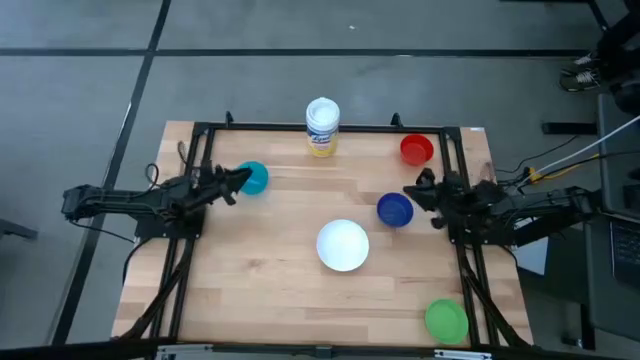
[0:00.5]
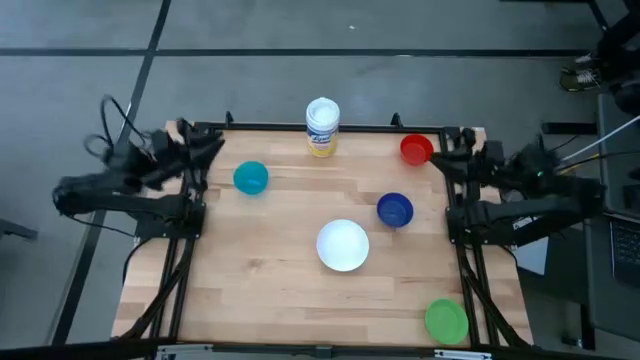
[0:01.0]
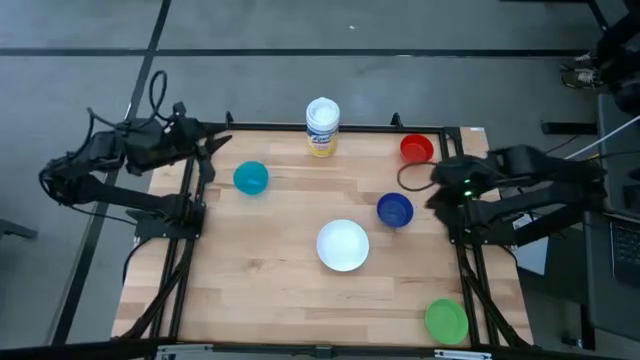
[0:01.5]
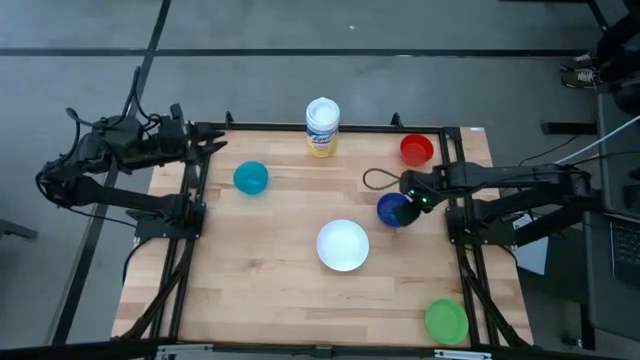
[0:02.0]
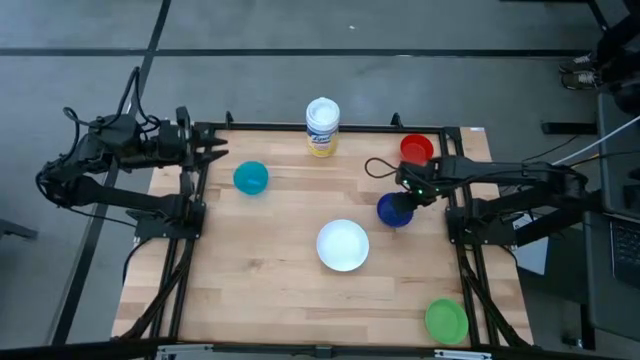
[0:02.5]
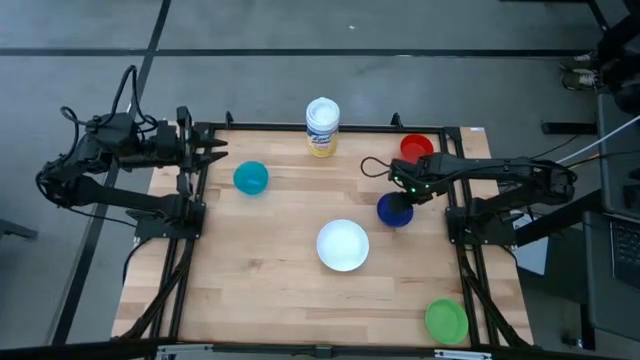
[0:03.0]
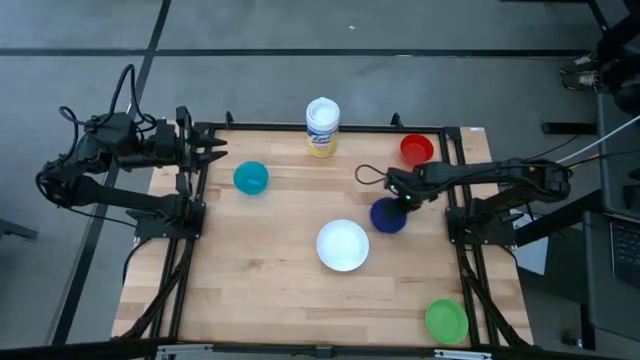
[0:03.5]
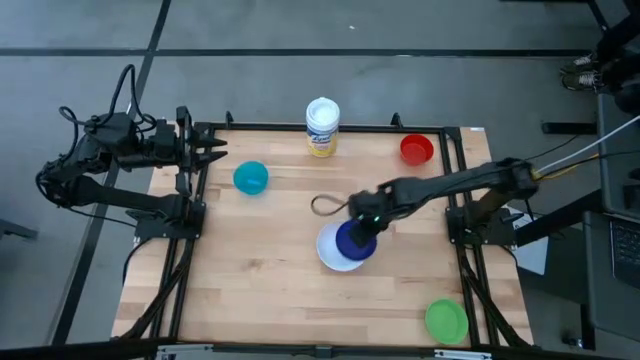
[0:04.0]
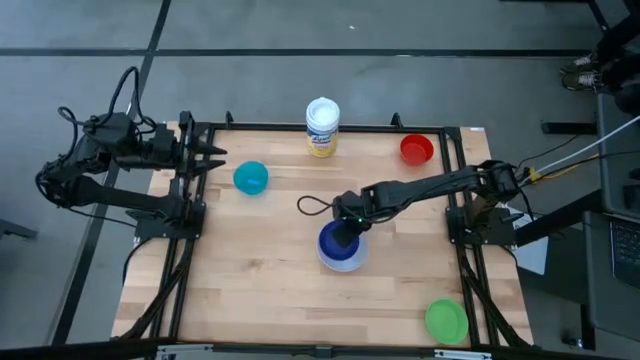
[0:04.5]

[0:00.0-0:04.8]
Stack the dark blue bowl on the white bowl

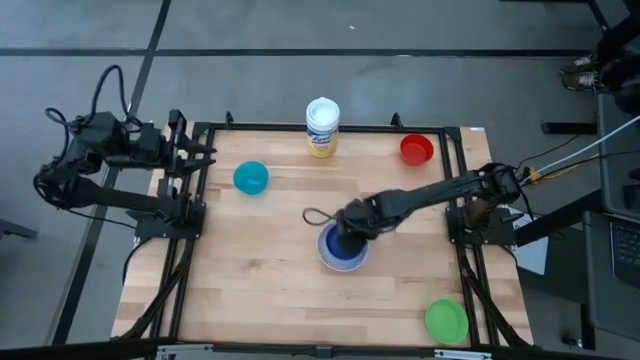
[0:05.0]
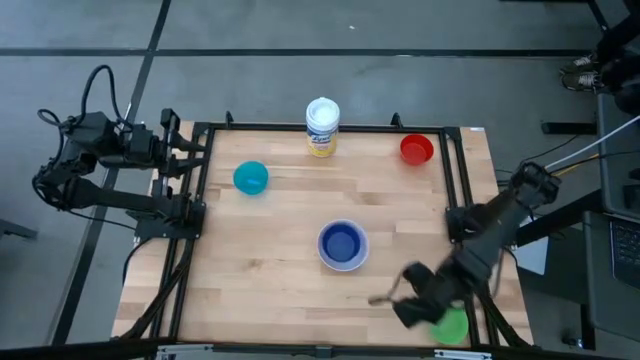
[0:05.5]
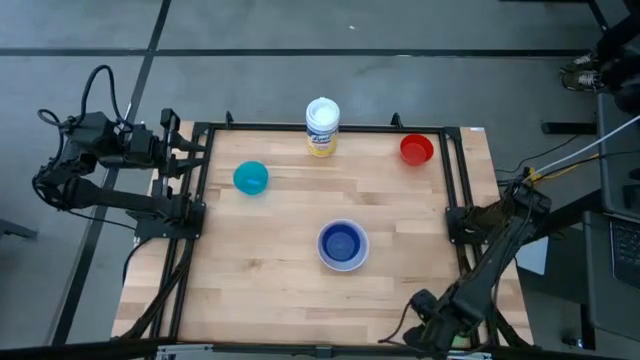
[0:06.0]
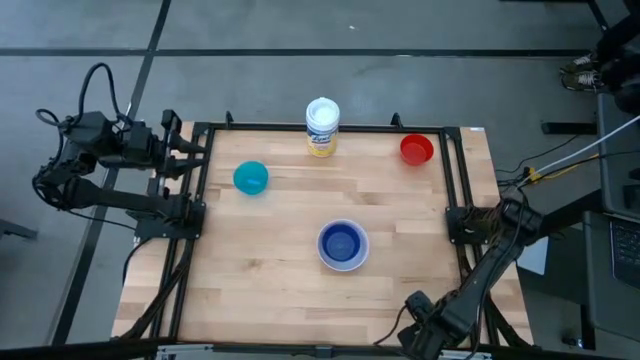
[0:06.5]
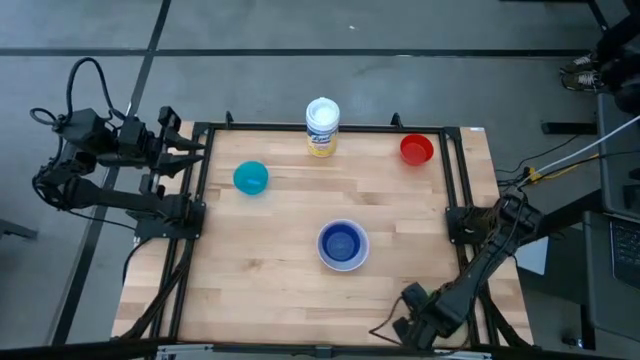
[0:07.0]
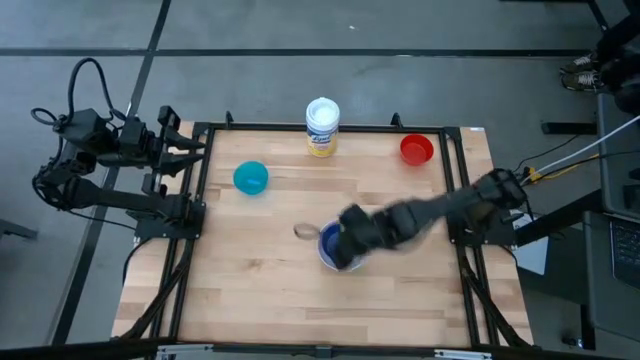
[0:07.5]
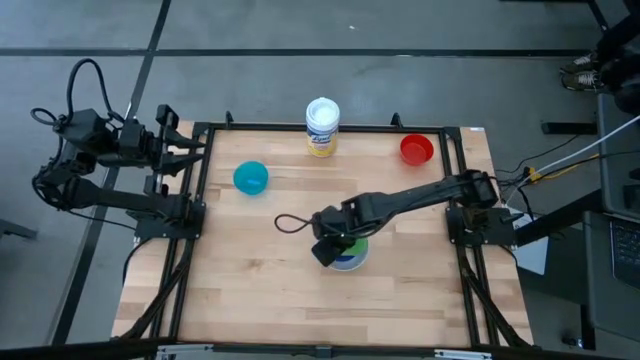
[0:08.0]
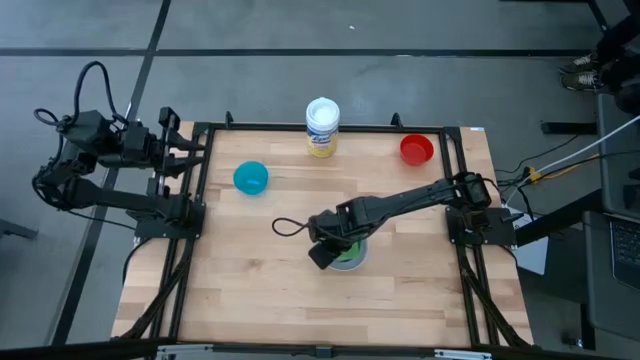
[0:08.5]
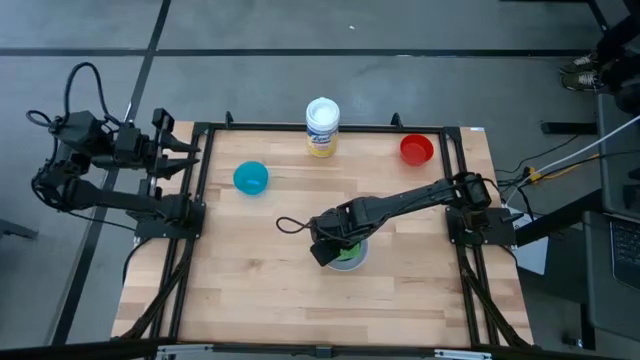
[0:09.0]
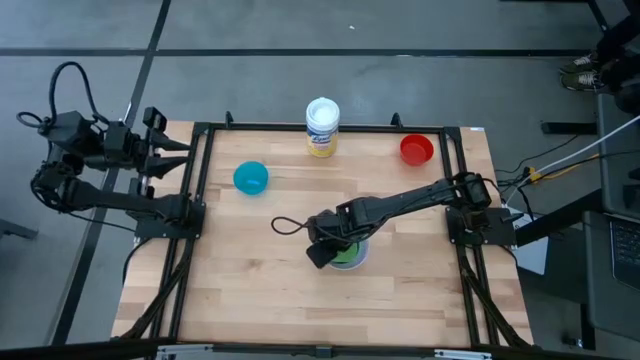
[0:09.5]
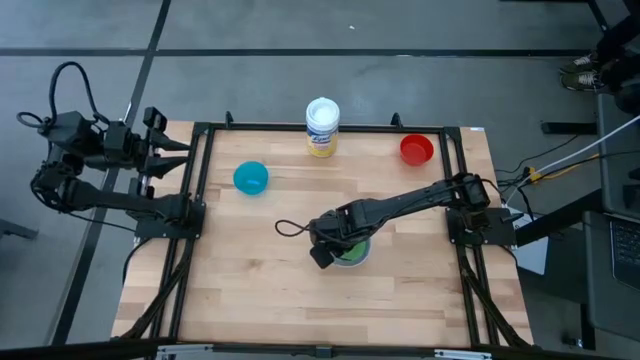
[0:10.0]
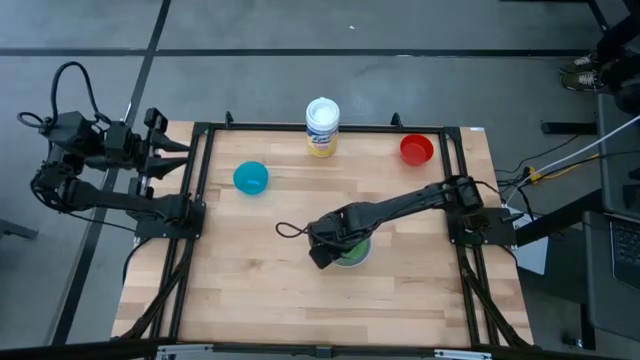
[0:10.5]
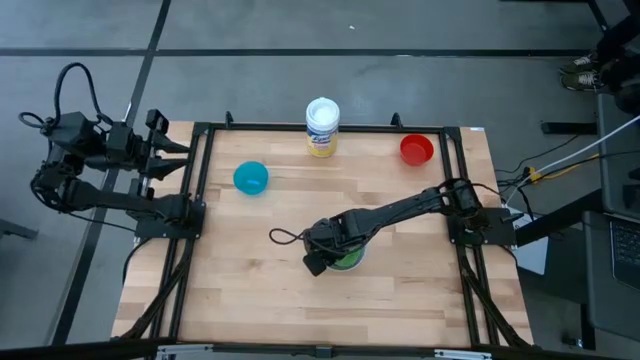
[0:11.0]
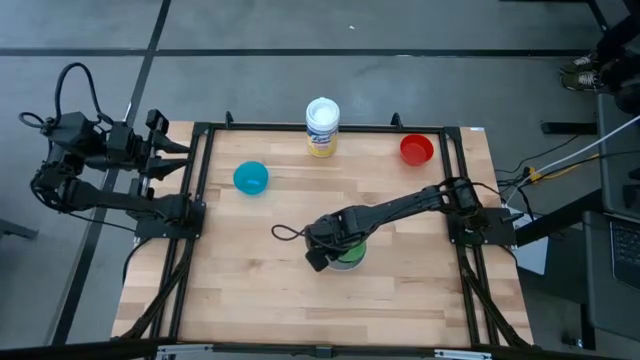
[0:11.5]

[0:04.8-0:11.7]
Stack the green bowl on the dark blue bowl

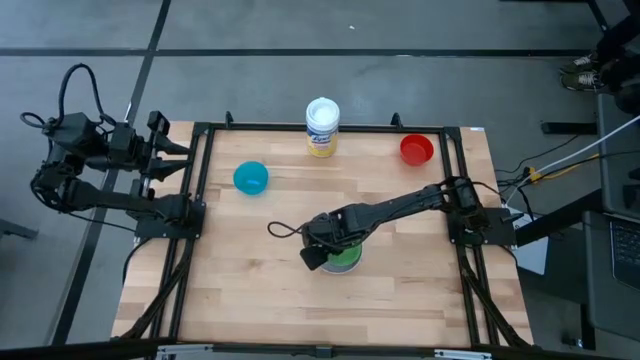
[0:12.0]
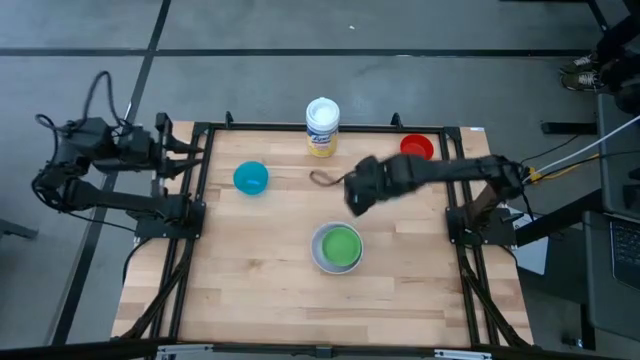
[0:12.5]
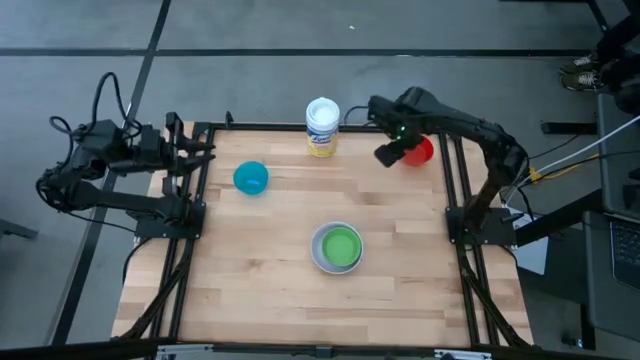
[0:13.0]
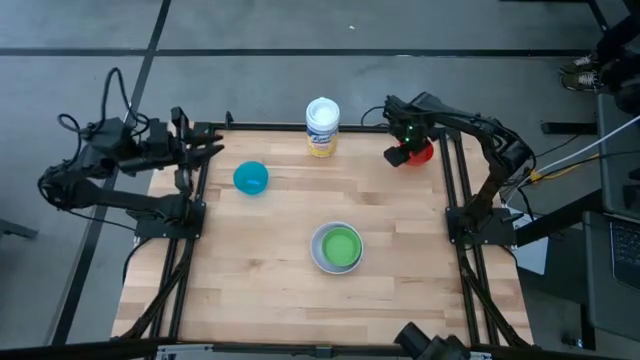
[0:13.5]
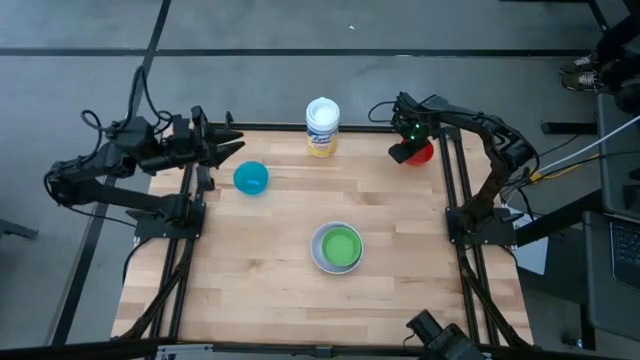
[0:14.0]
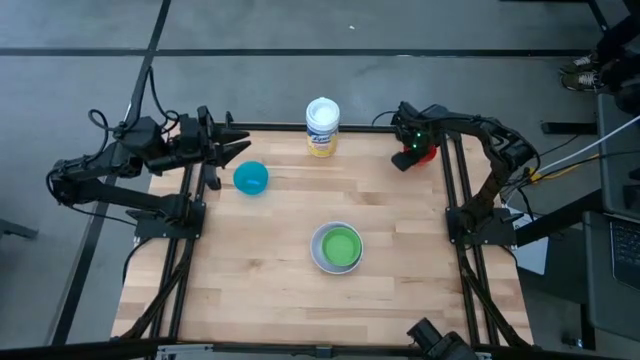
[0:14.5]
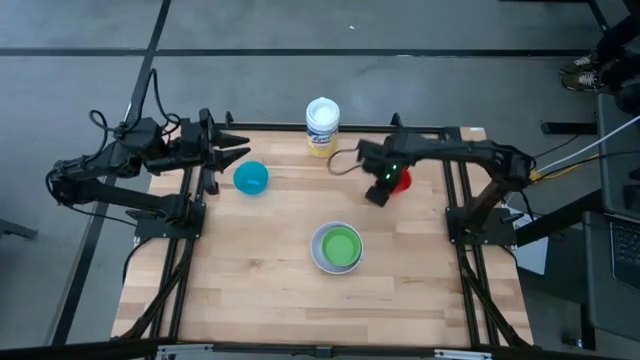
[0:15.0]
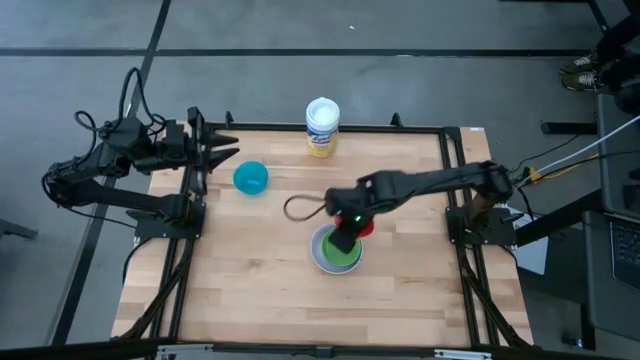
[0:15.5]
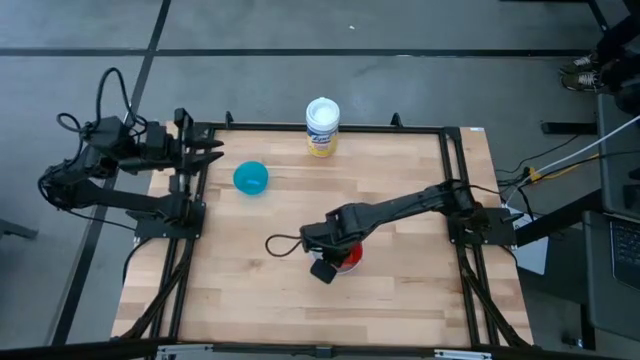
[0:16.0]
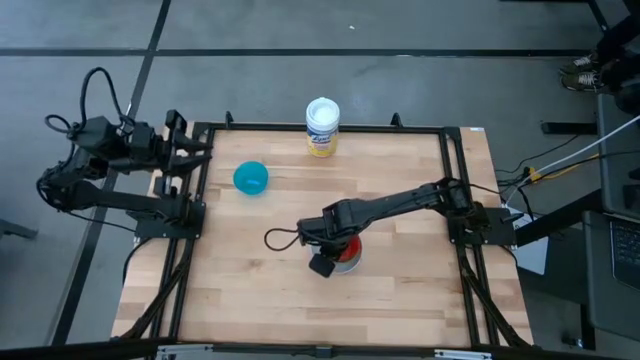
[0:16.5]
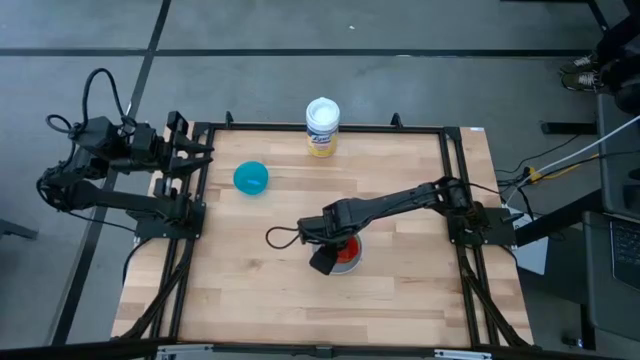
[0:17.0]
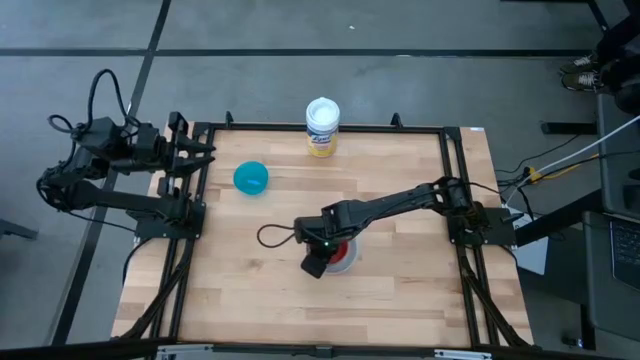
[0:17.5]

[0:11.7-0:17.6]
Stack the red bowl on the green bowl

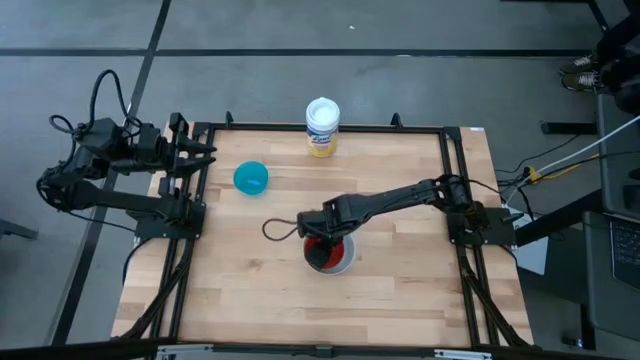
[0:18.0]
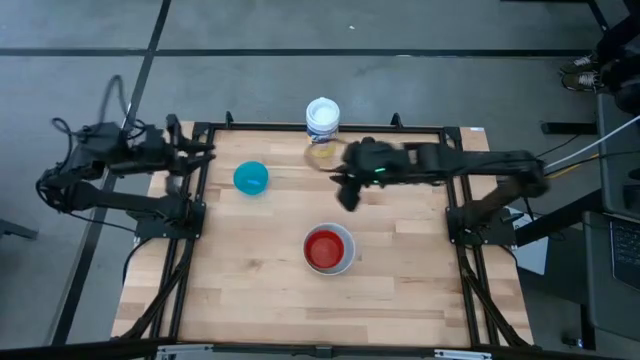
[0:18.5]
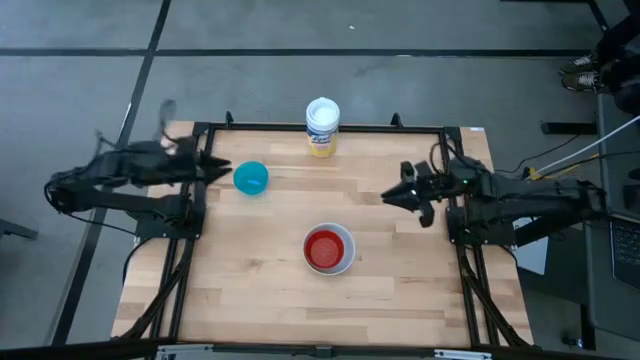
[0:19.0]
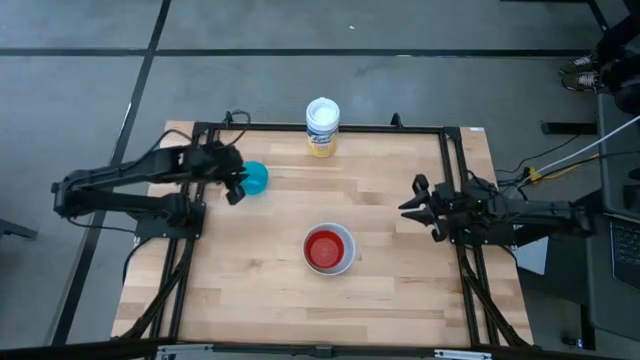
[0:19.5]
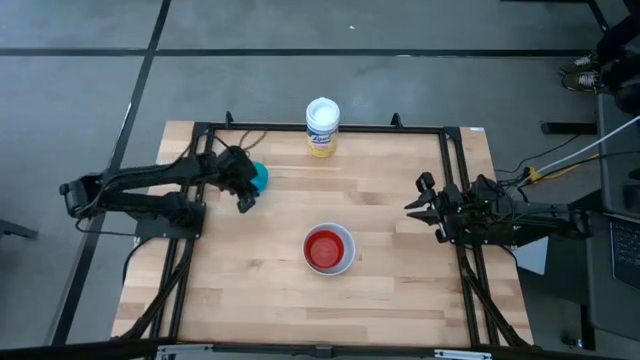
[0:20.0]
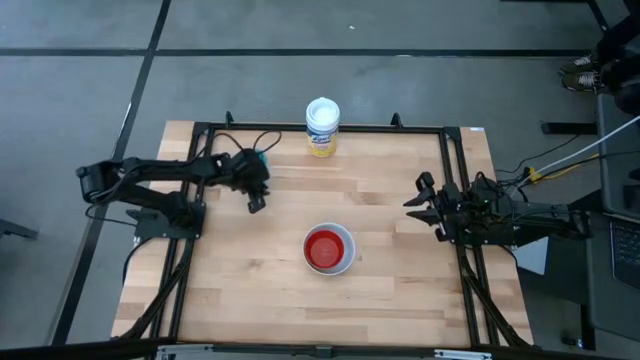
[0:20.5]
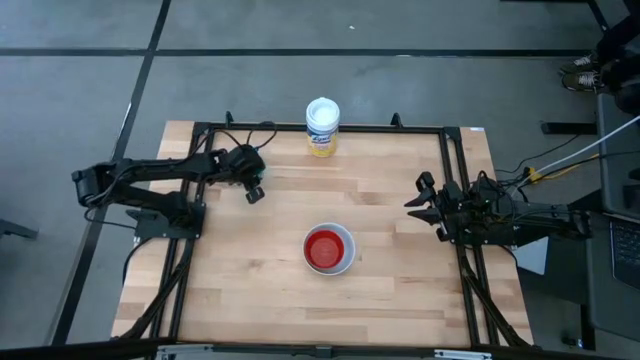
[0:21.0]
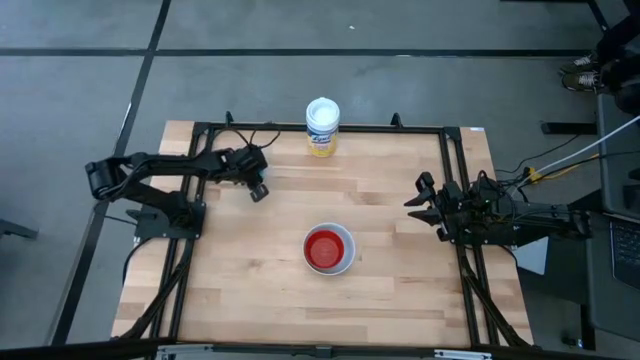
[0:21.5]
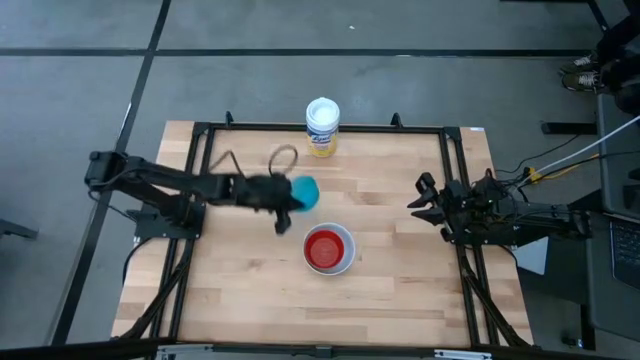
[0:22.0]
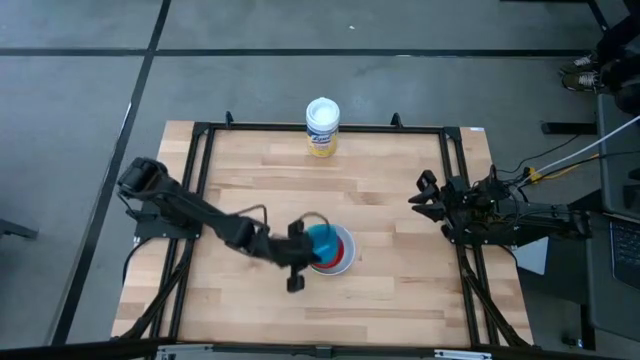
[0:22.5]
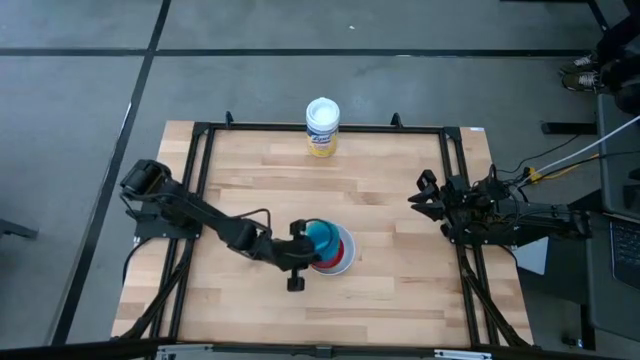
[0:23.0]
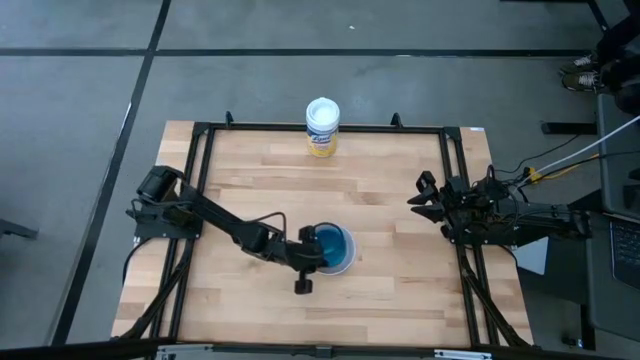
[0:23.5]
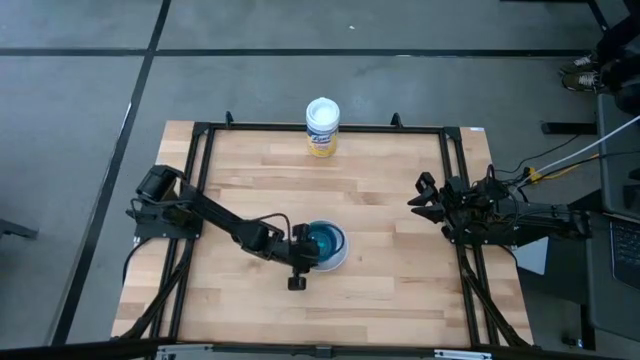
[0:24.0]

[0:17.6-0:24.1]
Stack the light blue bowl on the red bowl
